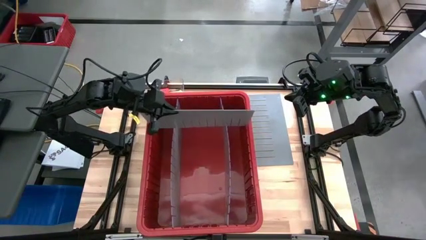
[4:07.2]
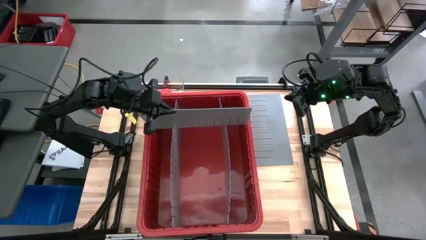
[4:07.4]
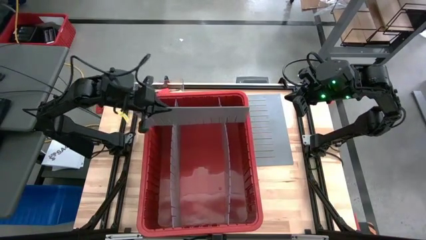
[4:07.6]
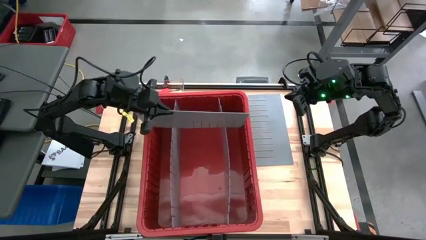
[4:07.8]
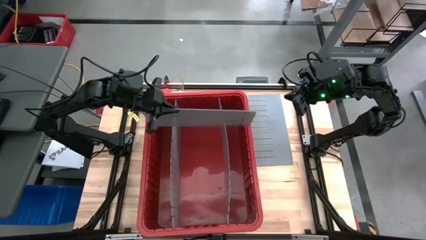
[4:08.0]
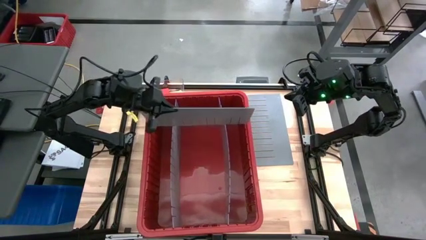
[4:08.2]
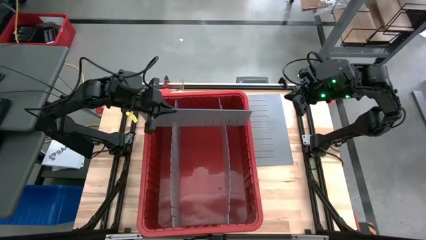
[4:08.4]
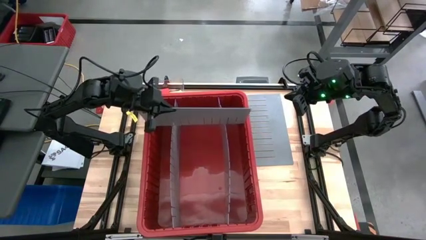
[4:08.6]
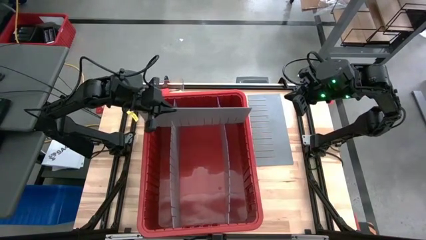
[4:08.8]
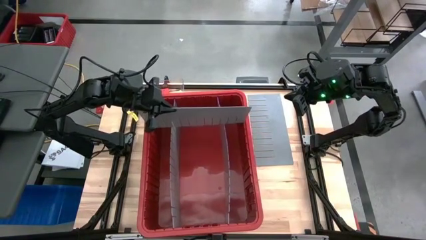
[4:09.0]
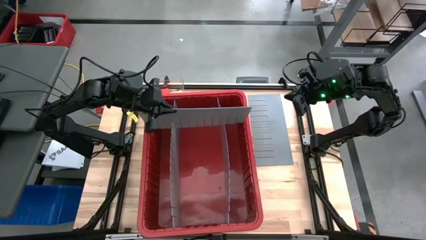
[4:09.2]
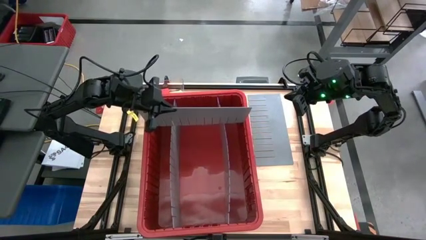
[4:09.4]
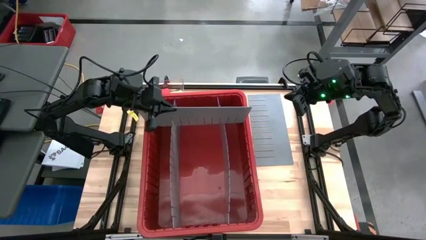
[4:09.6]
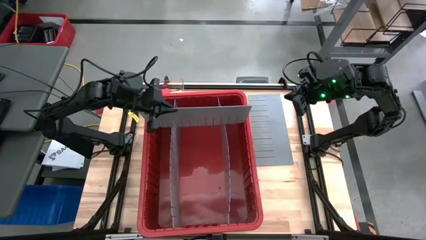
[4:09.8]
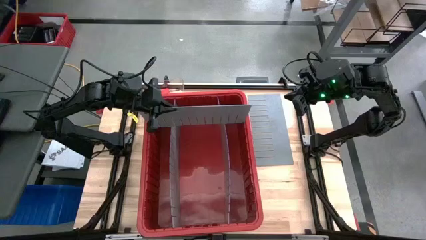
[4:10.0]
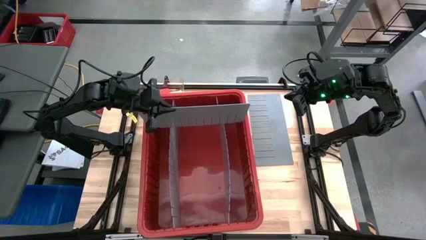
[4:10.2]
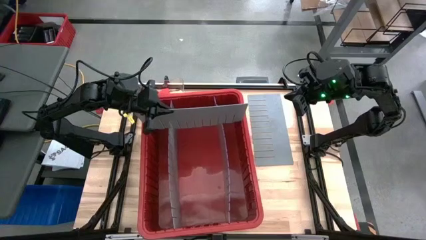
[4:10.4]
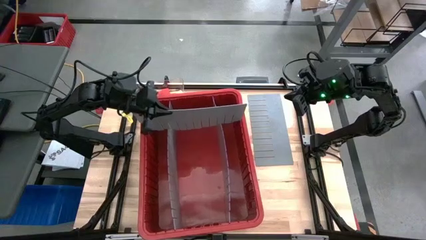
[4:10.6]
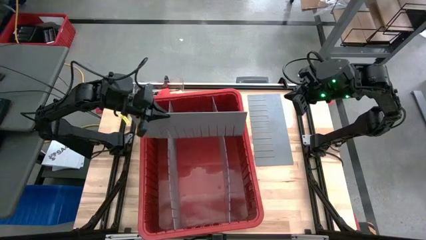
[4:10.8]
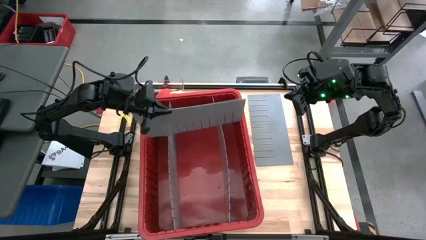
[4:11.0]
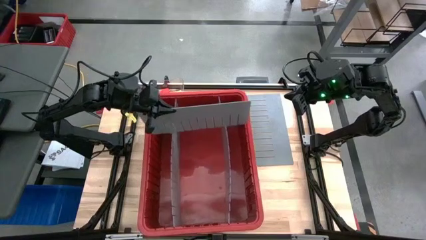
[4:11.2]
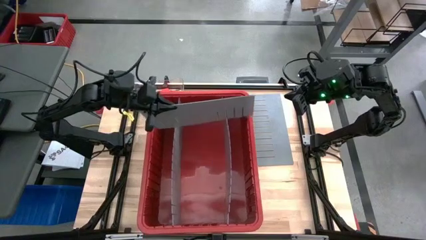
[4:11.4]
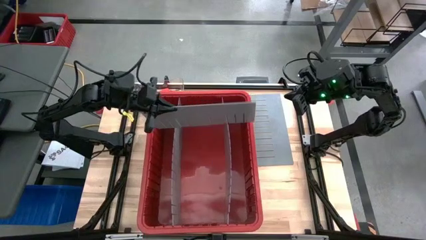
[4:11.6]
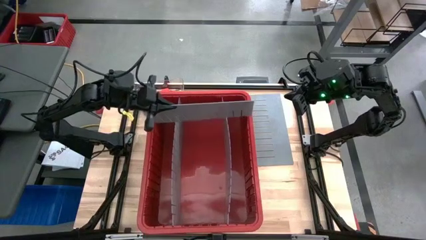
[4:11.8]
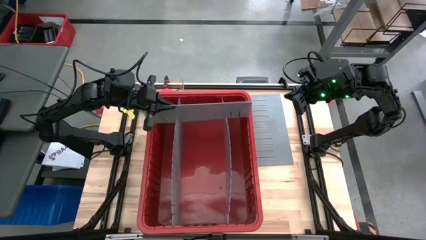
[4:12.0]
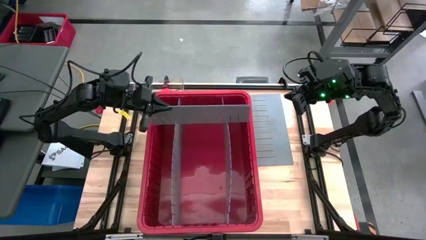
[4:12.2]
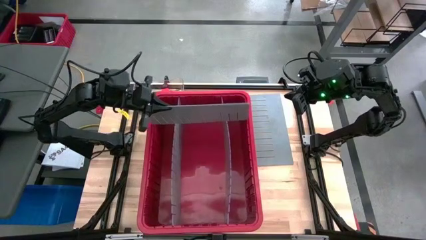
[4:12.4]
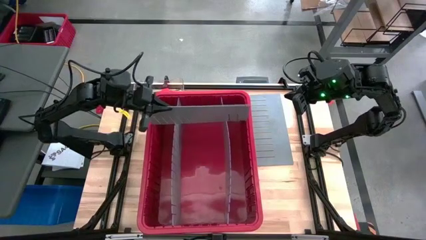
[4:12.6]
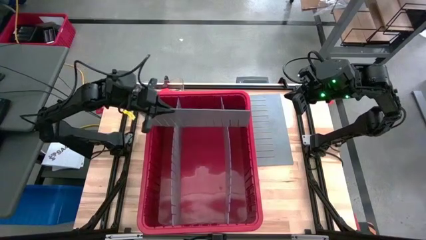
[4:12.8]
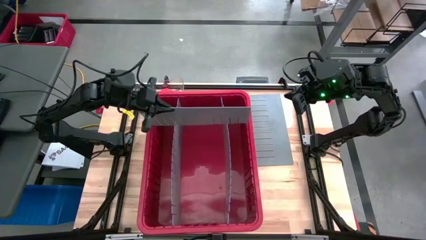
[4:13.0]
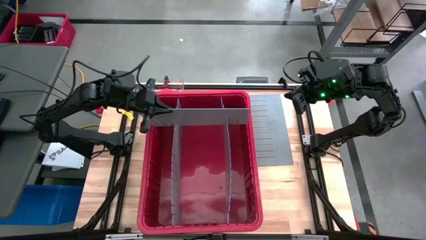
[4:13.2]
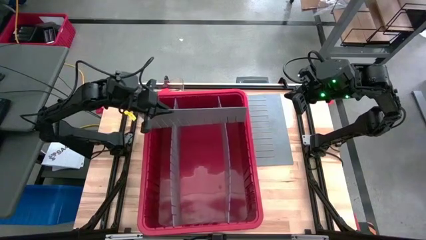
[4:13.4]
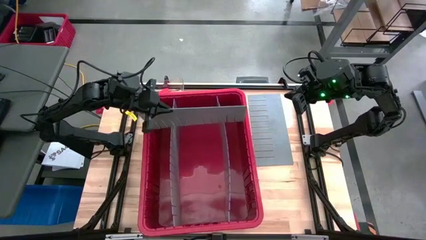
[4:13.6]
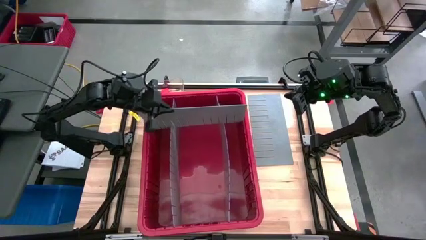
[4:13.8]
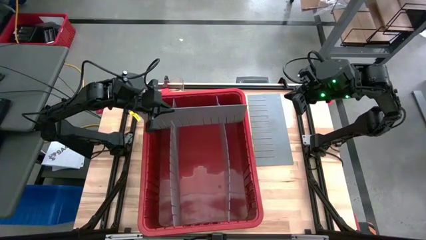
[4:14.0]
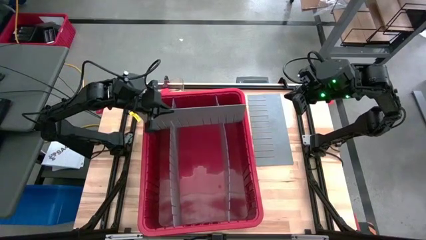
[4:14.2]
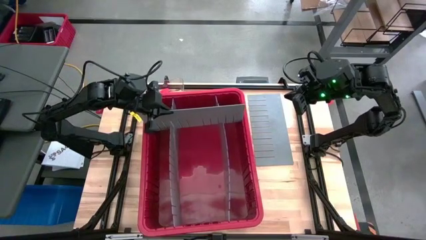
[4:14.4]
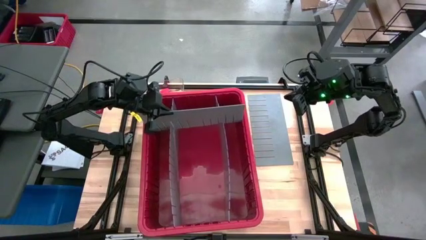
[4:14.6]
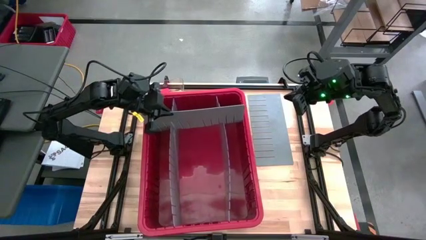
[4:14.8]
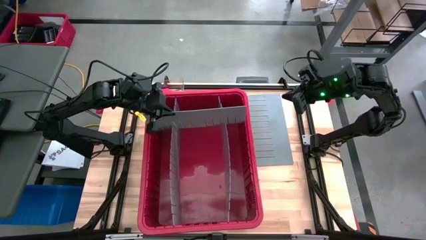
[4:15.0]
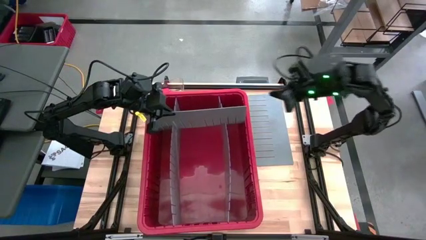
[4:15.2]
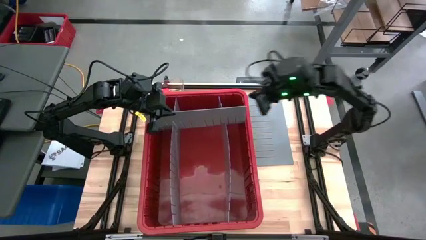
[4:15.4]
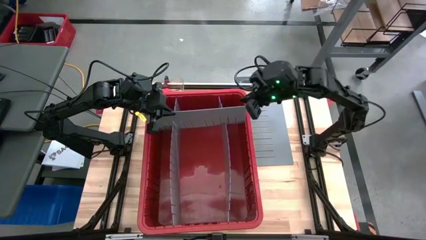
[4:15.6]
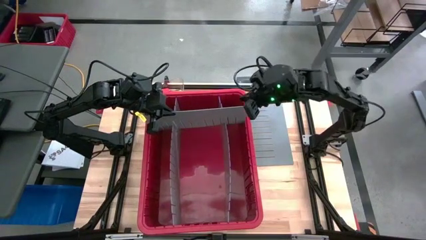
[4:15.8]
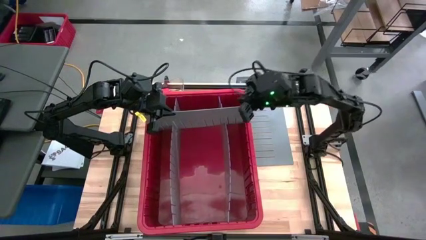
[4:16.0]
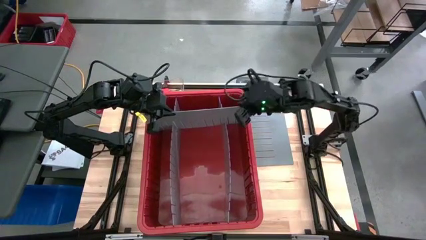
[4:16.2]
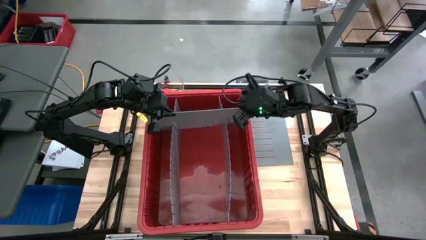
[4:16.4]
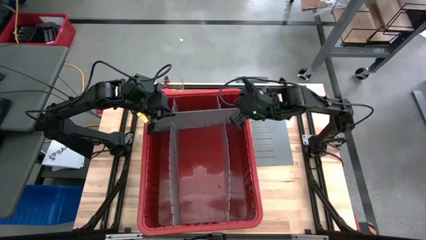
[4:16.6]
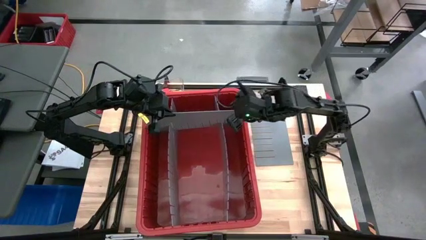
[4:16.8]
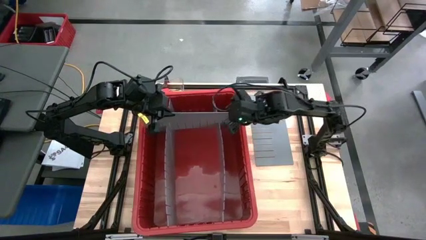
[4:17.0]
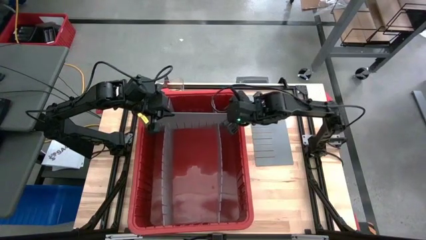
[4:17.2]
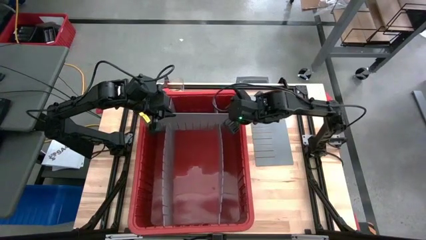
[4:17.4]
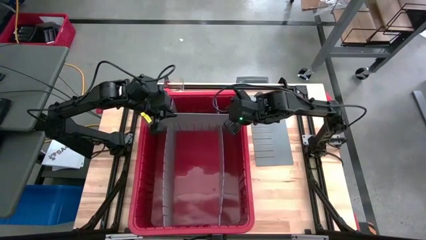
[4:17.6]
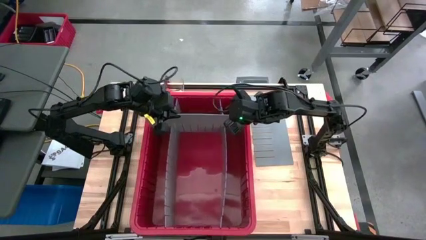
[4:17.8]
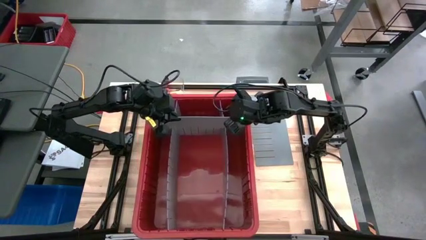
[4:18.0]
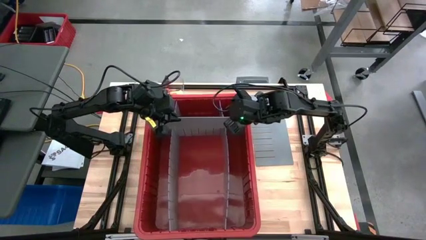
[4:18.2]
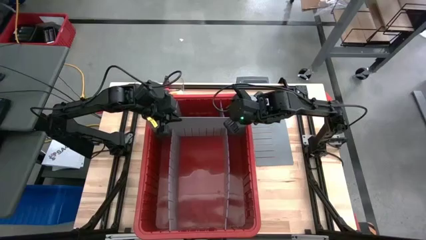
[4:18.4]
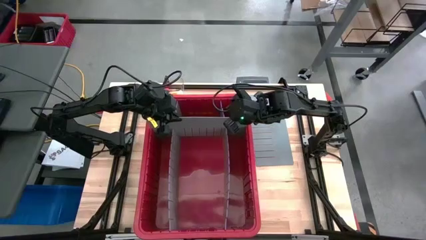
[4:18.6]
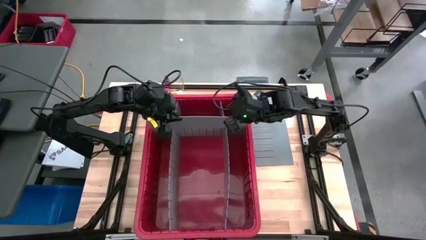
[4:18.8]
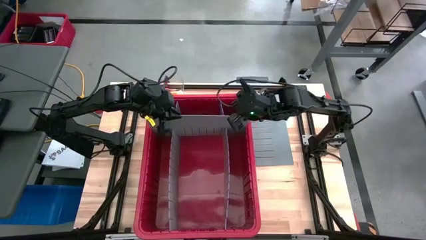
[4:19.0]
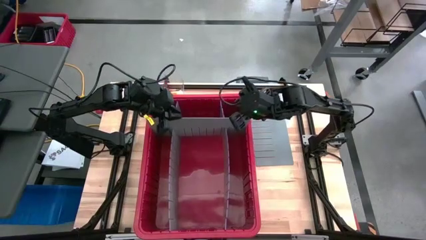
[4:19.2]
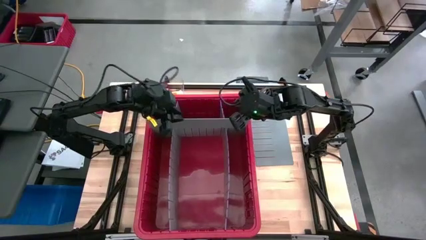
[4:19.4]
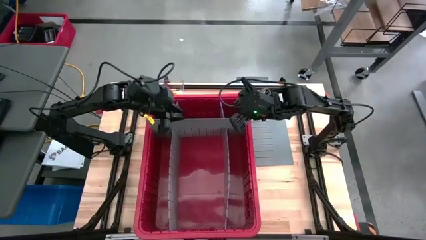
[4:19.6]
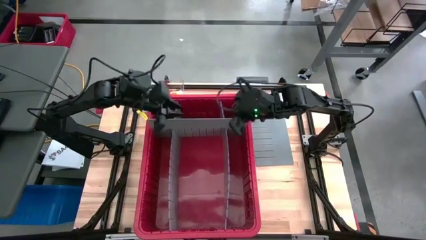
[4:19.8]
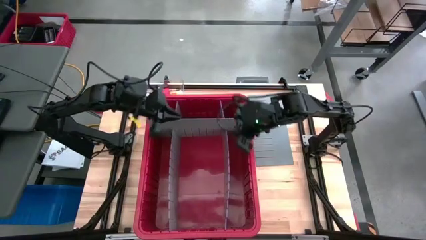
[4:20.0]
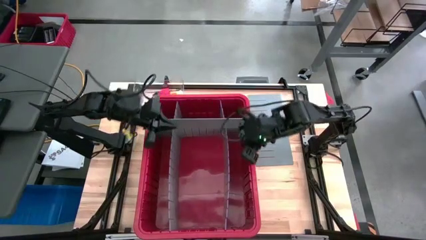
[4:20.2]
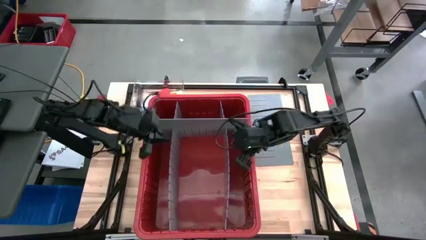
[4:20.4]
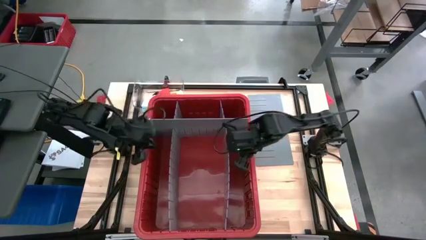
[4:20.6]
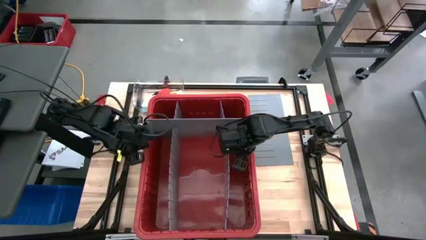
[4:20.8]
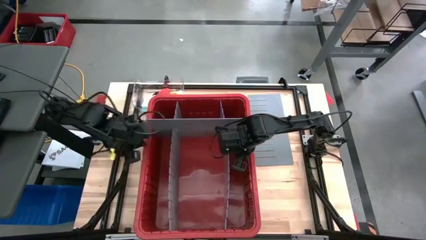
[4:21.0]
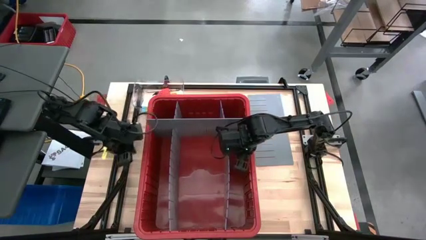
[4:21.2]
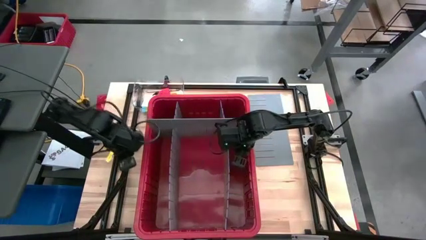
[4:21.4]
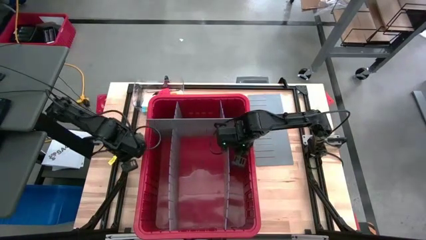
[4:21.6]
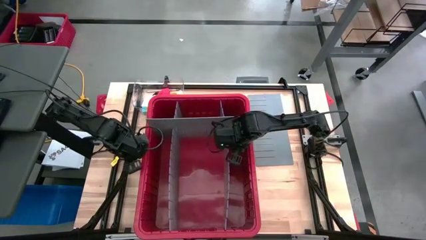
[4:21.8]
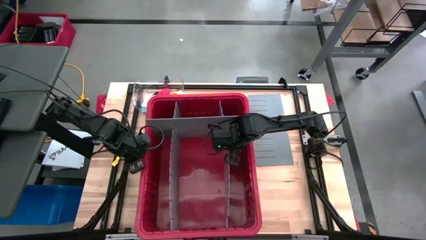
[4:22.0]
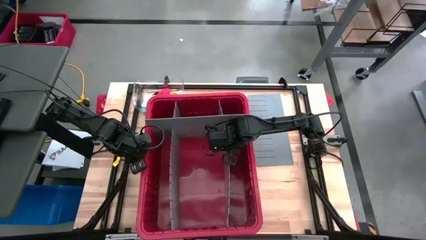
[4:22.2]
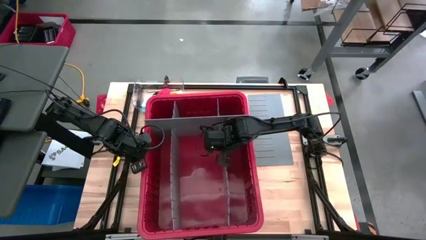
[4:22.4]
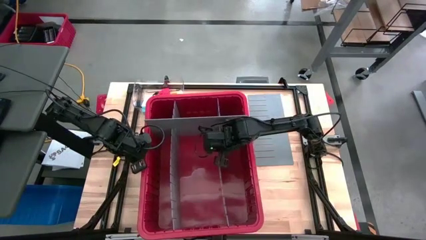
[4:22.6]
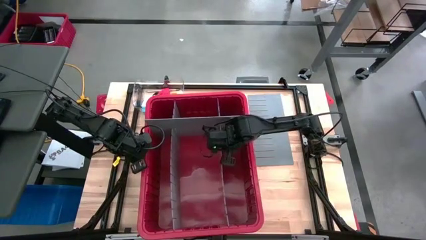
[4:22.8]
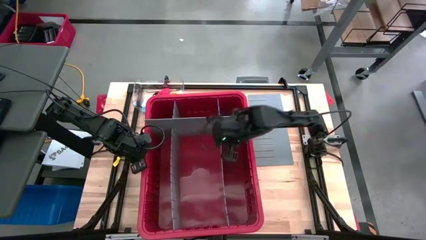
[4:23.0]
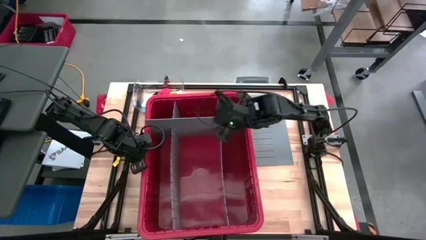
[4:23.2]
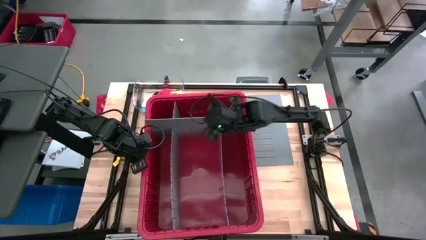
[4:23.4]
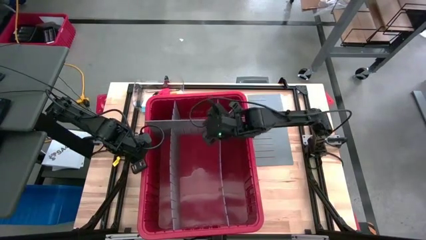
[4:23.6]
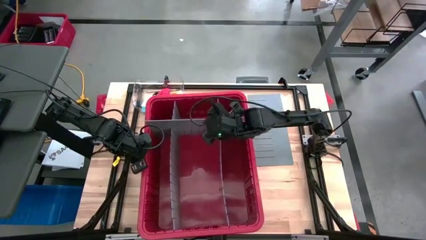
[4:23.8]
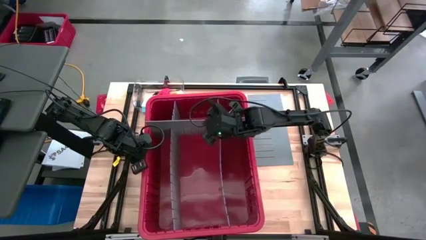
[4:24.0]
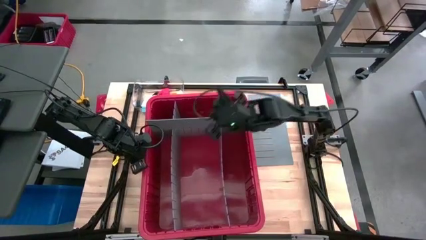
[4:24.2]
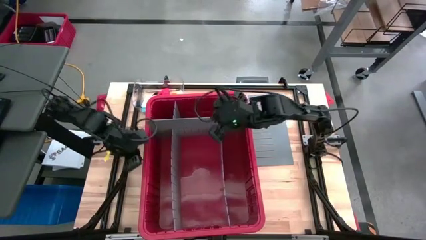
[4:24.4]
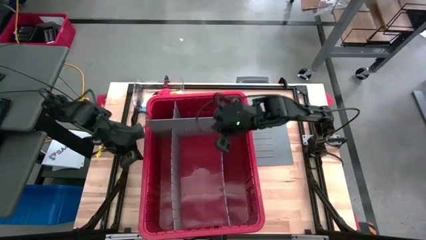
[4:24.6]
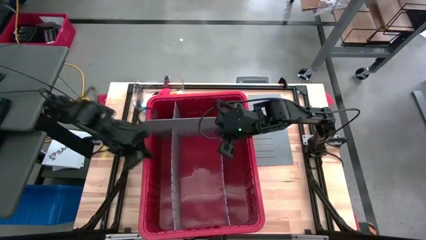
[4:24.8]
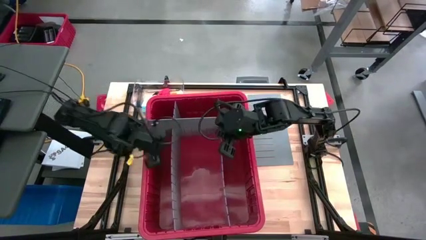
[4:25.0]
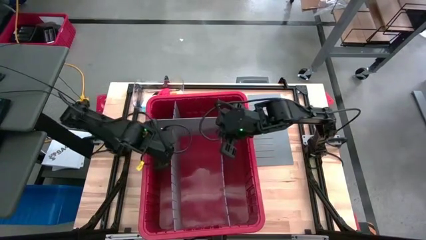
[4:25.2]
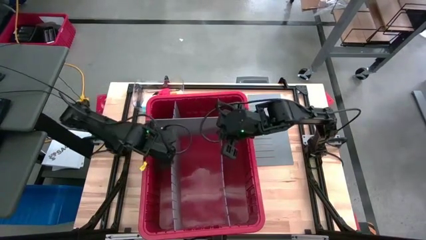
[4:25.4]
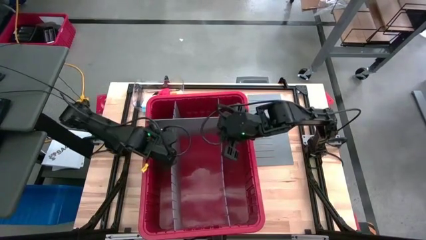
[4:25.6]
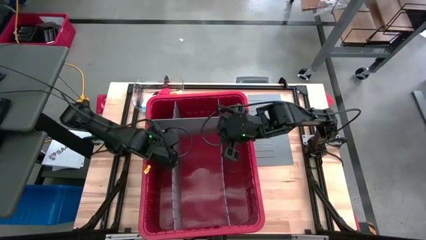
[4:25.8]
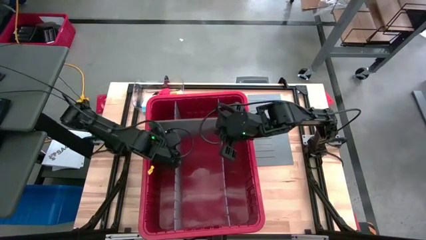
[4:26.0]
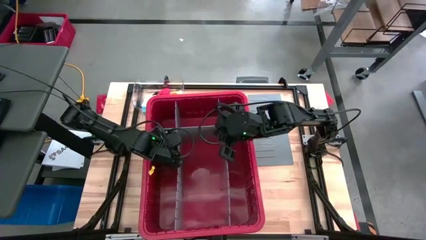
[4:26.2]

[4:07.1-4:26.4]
Task: Sort blocks
Assemble the bin divider into the red bin
